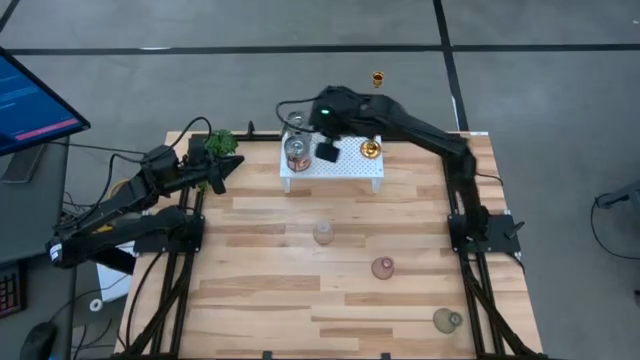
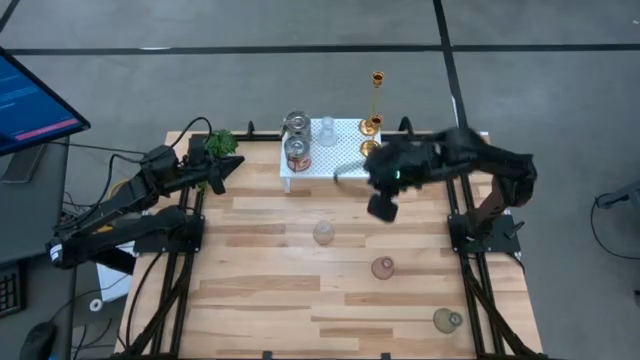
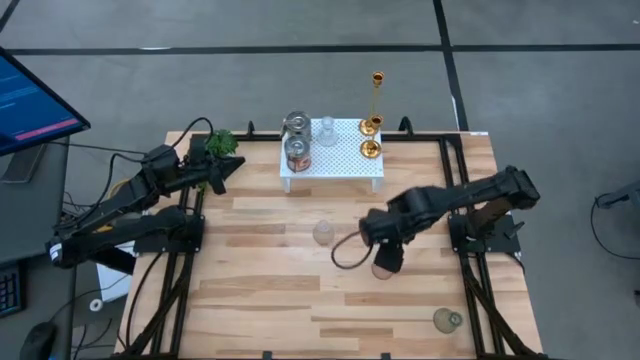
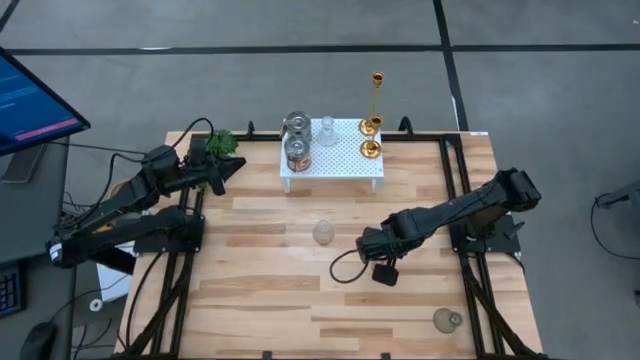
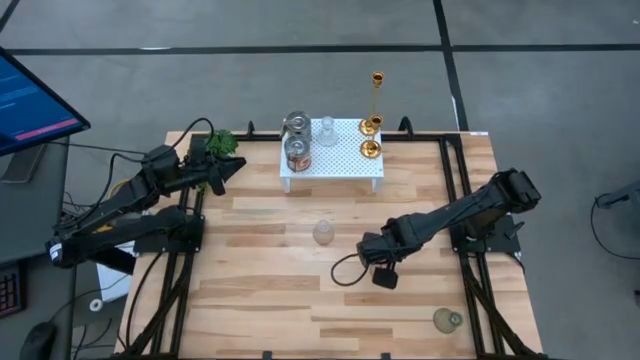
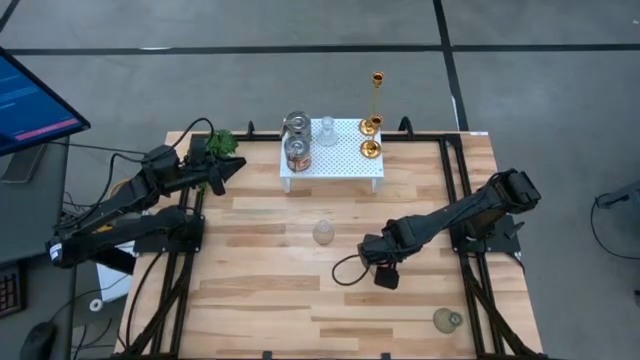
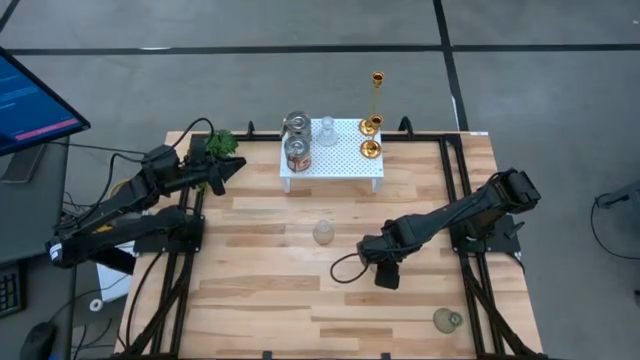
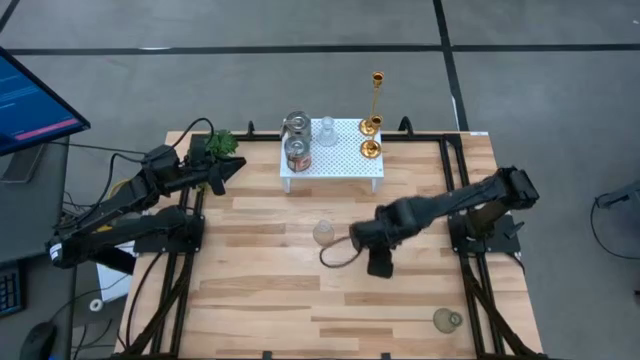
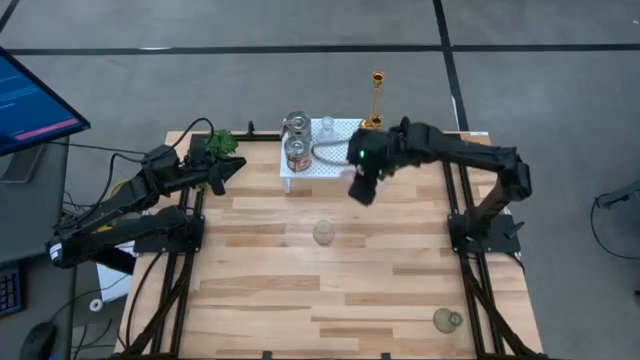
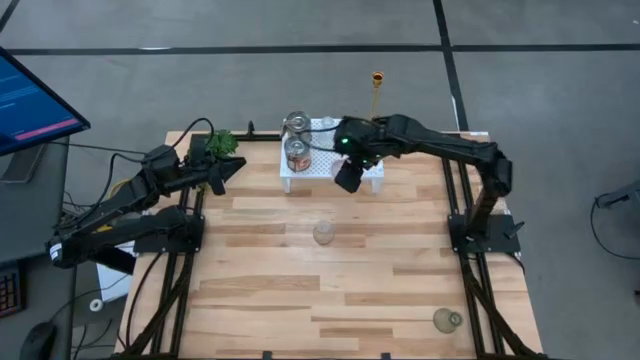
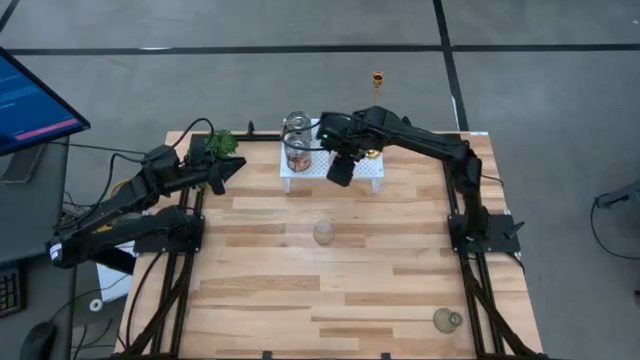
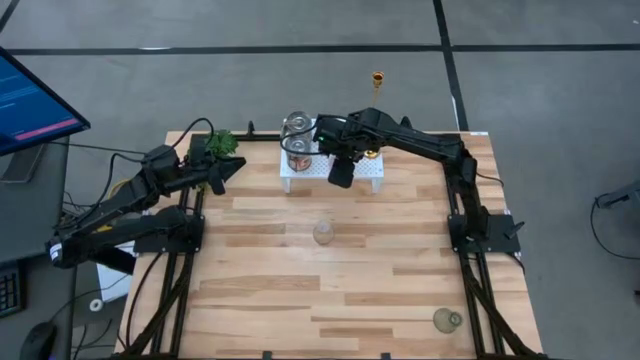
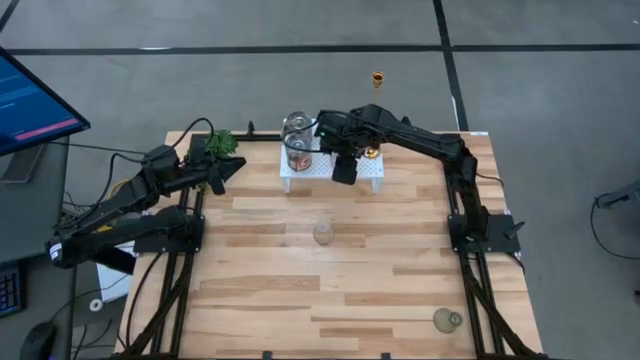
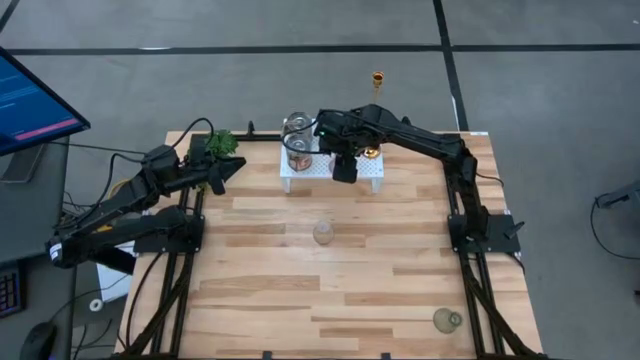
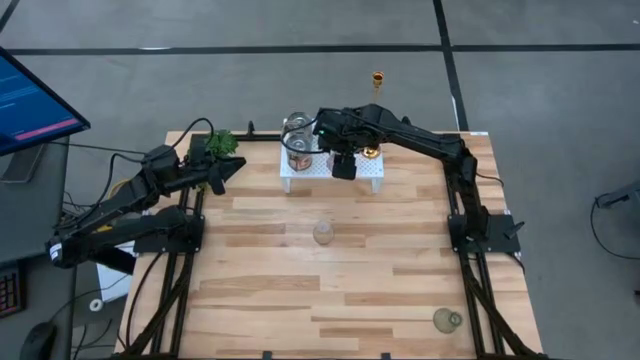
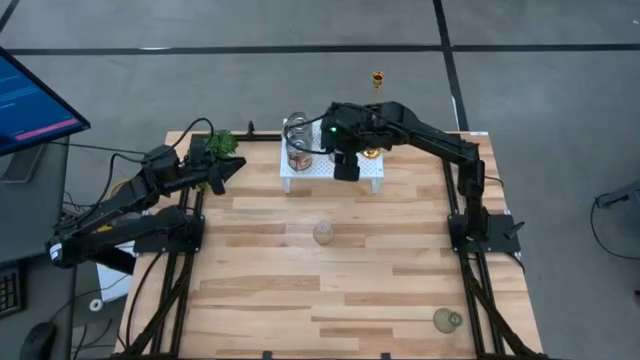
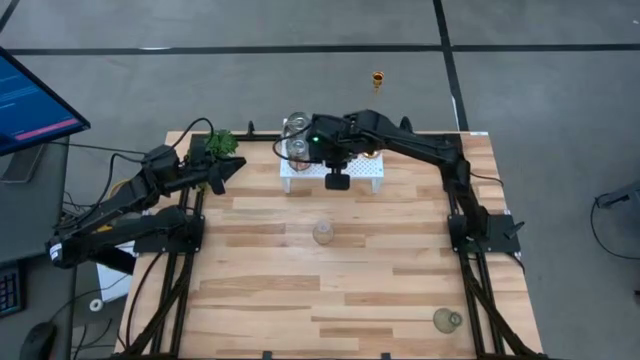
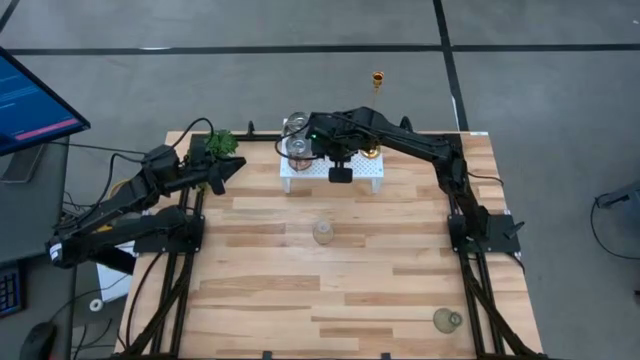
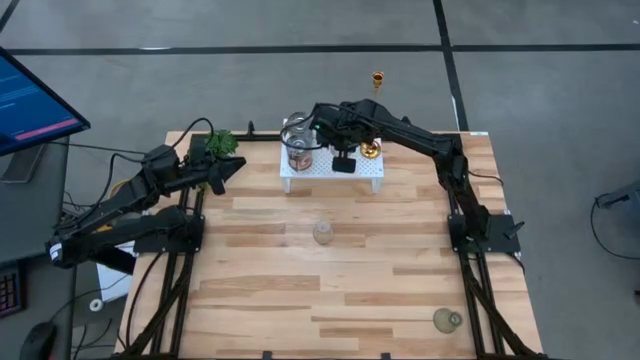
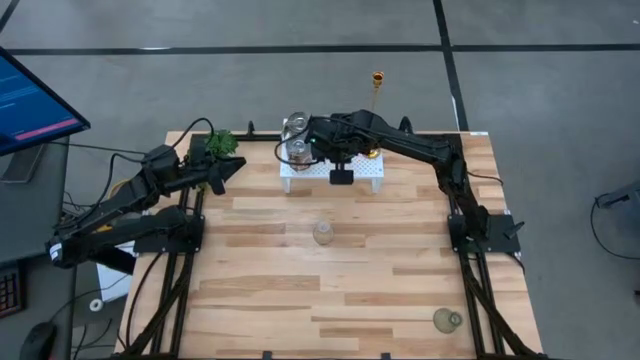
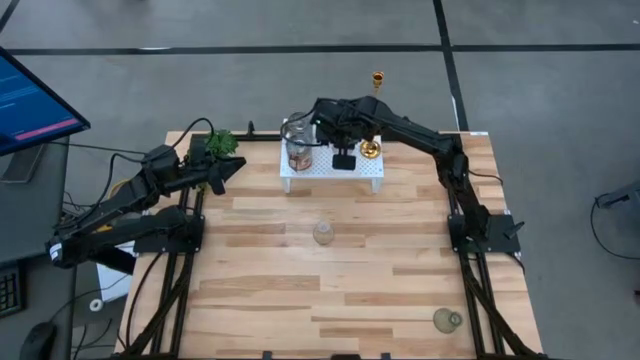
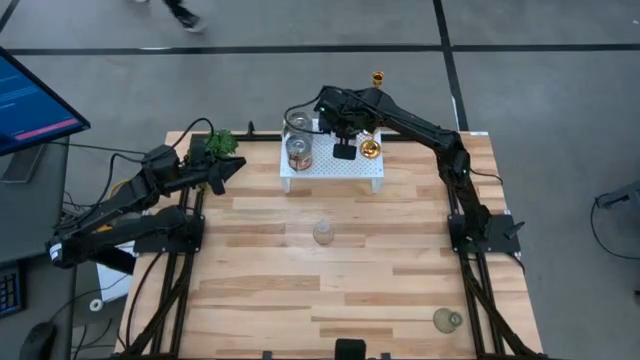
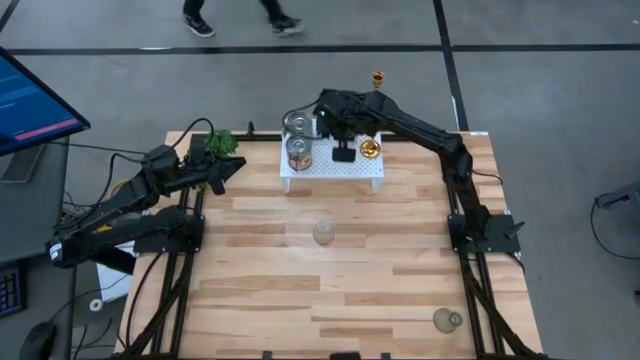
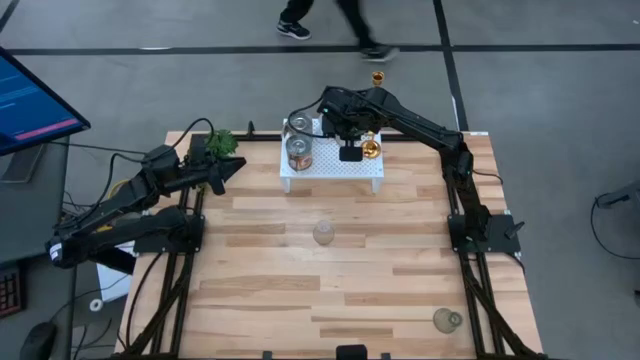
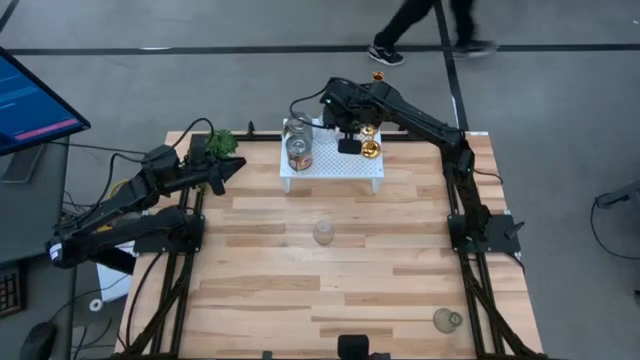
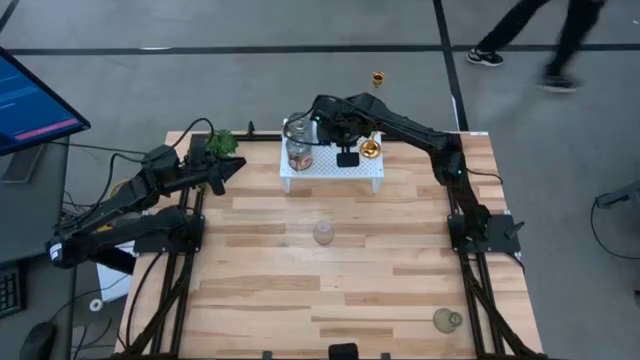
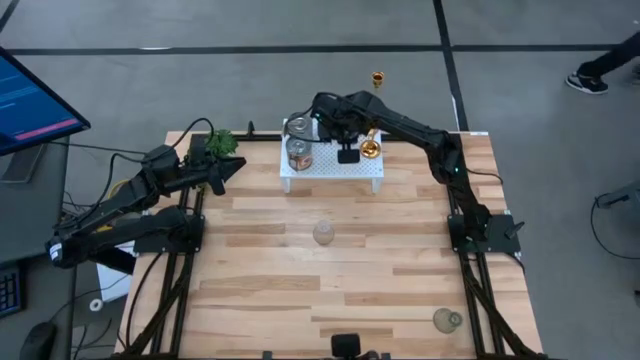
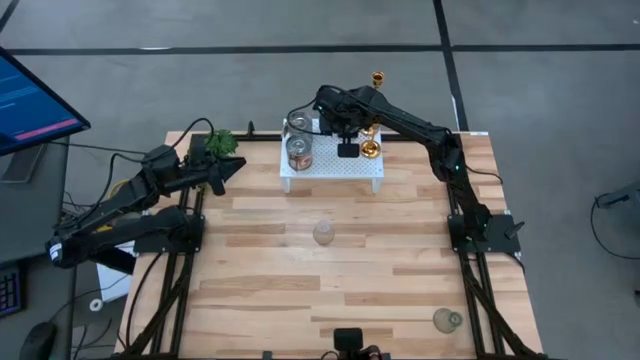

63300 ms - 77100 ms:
Task: Pick & Place candle stick holders
Put the pink candle holder on the shelf

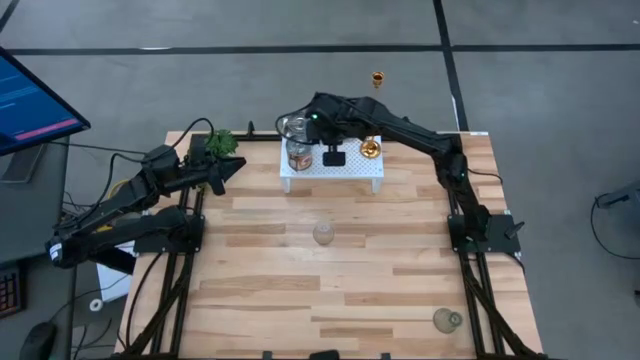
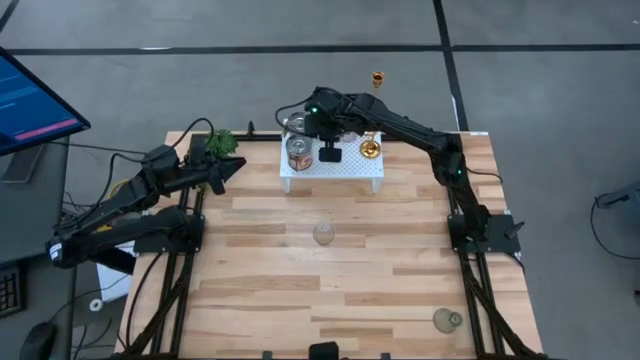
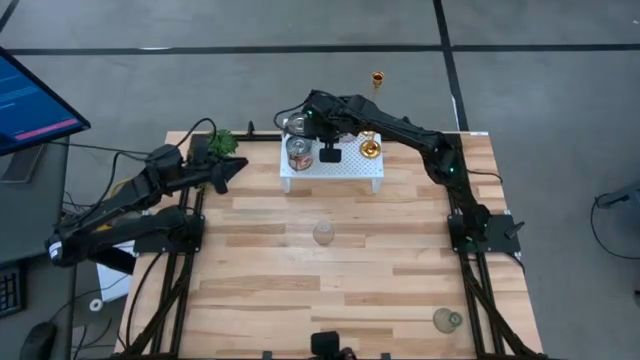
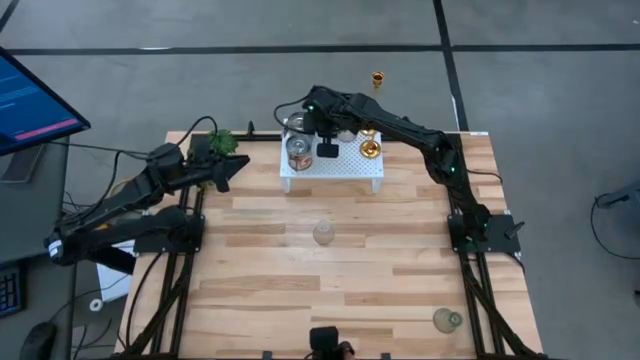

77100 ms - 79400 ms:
Adjust the transparent candle holder on the shelf

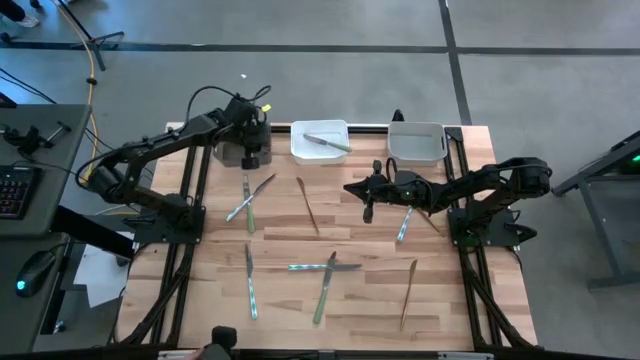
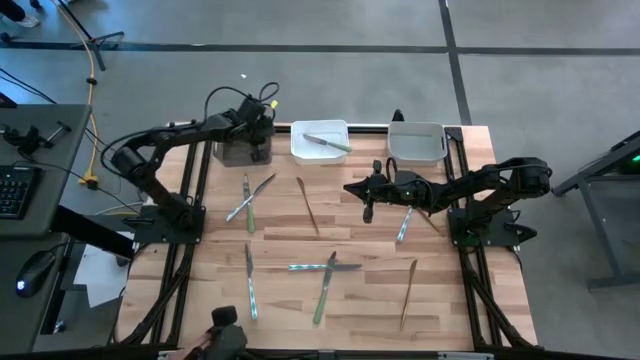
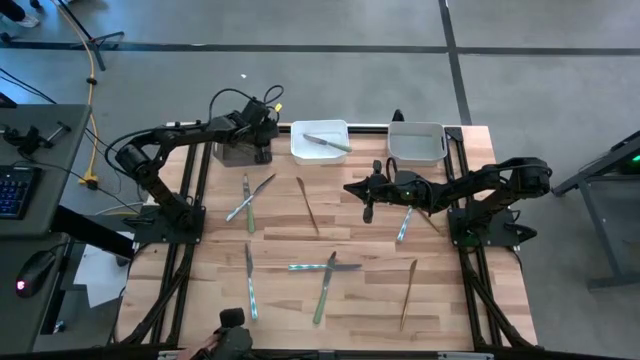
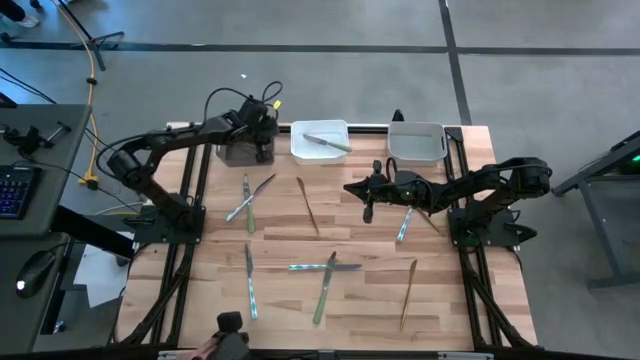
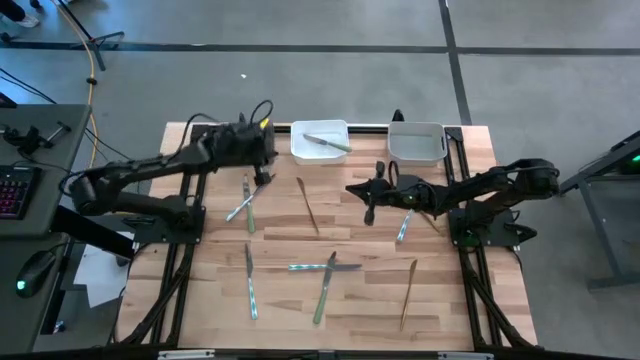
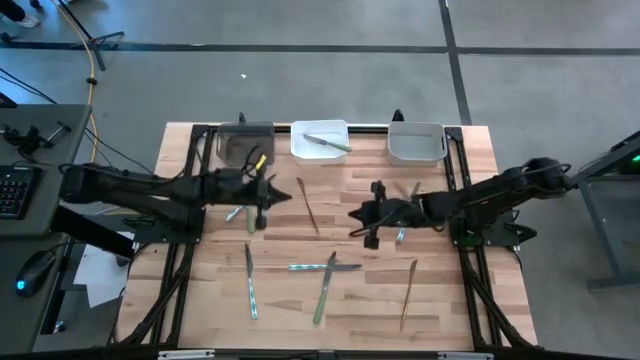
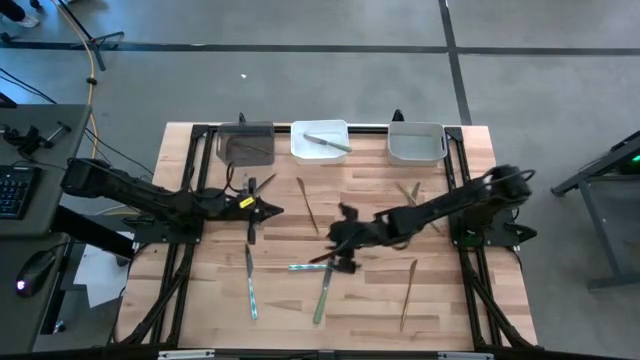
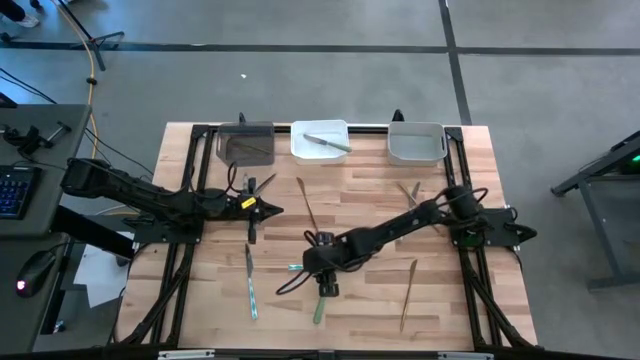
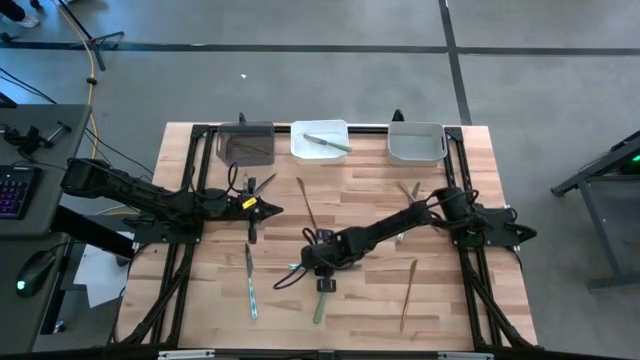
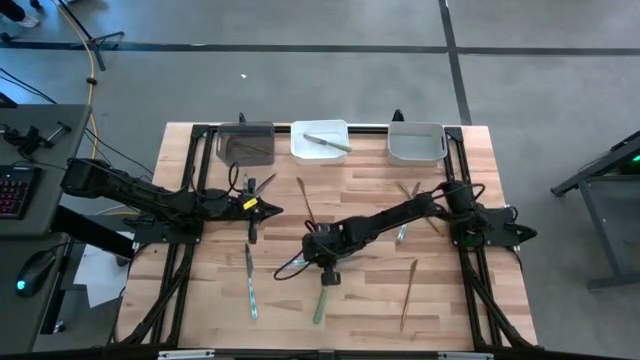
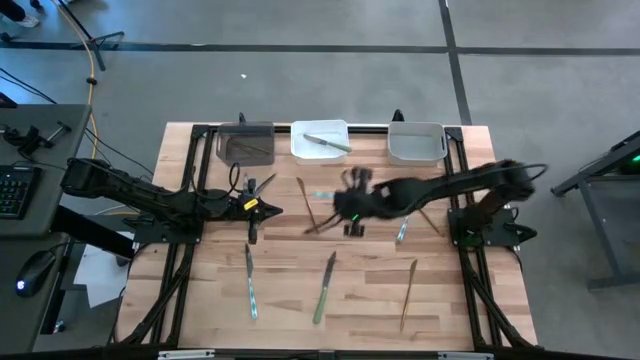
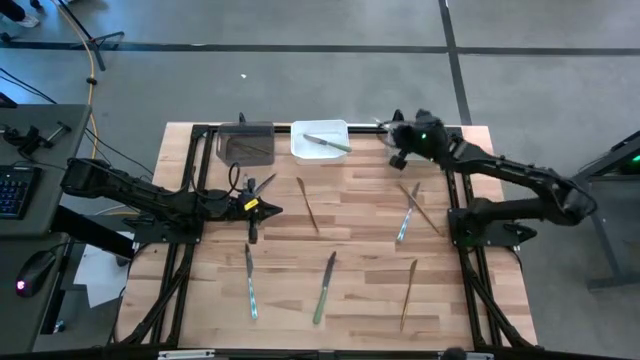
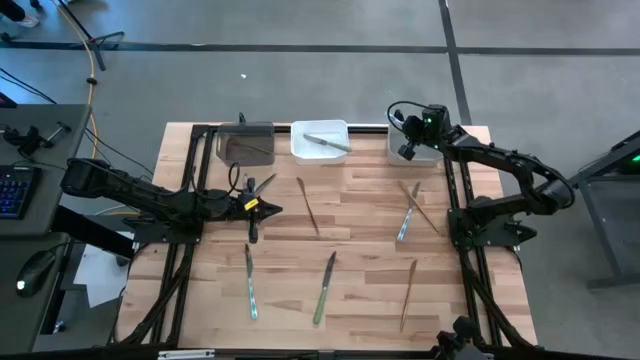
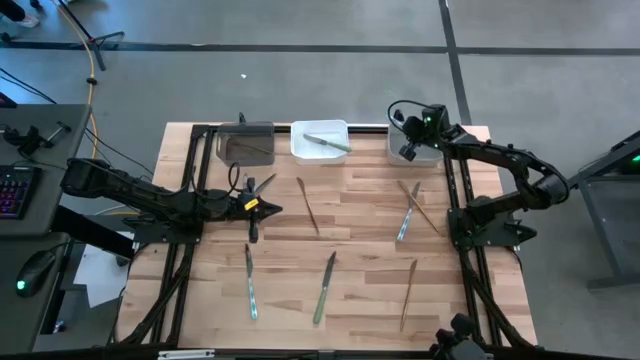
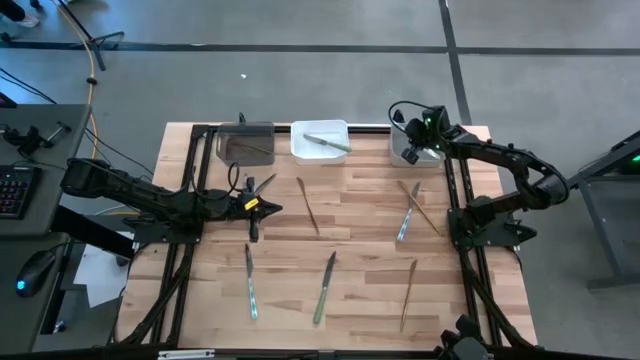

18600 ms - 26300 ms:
Task: Sort silverware by color (type)
Put the blue patterned knife into the gray bin
